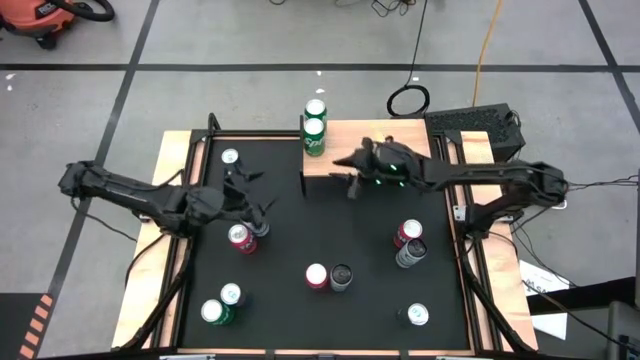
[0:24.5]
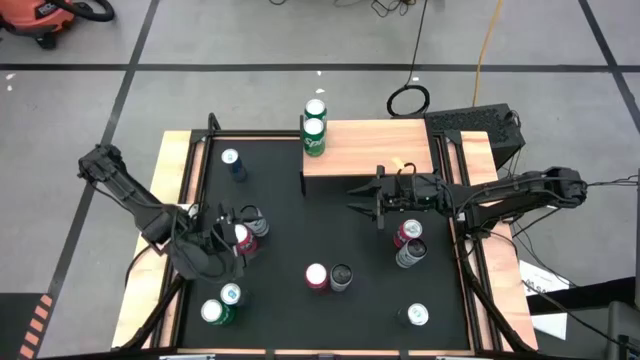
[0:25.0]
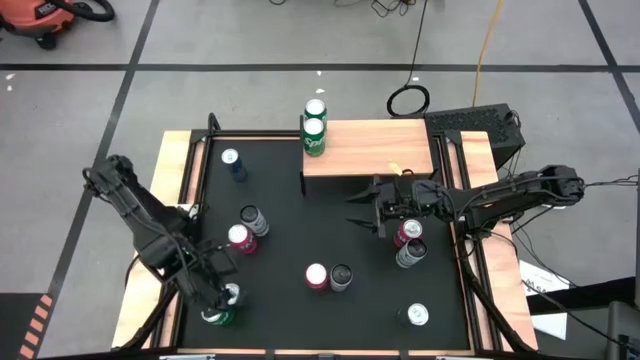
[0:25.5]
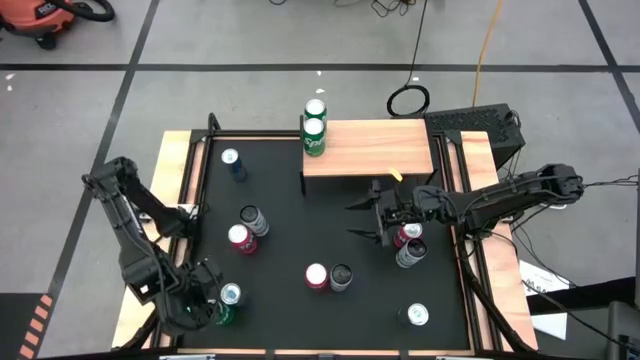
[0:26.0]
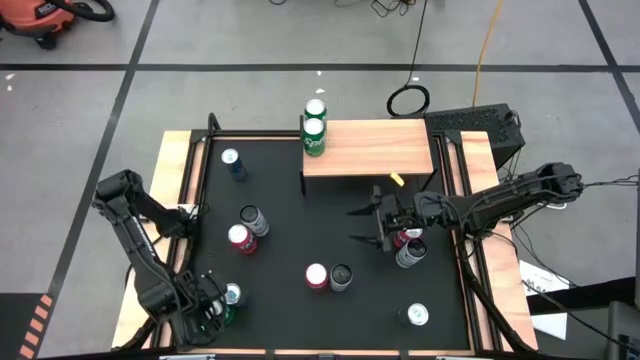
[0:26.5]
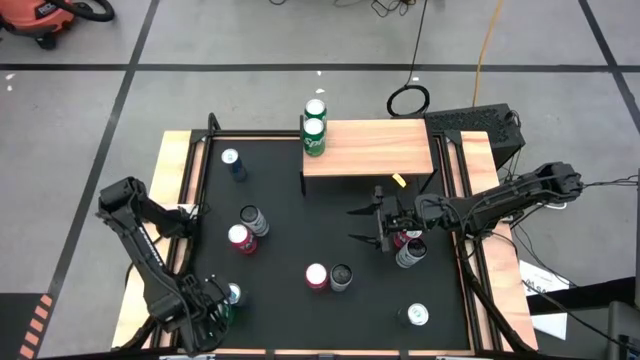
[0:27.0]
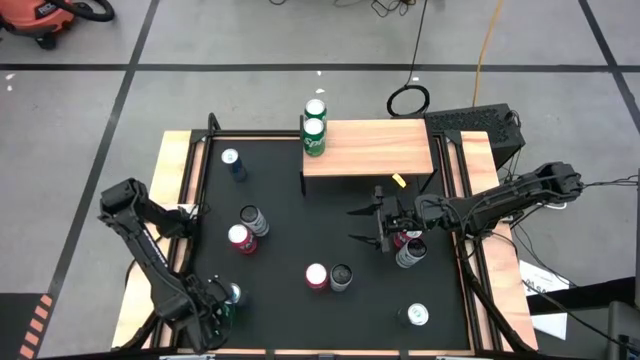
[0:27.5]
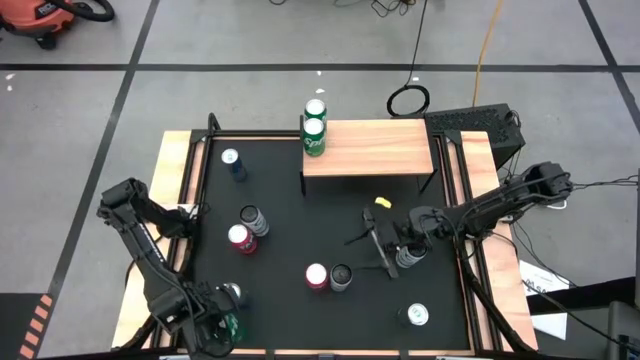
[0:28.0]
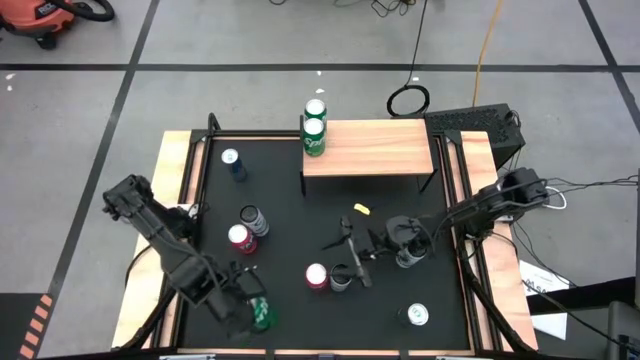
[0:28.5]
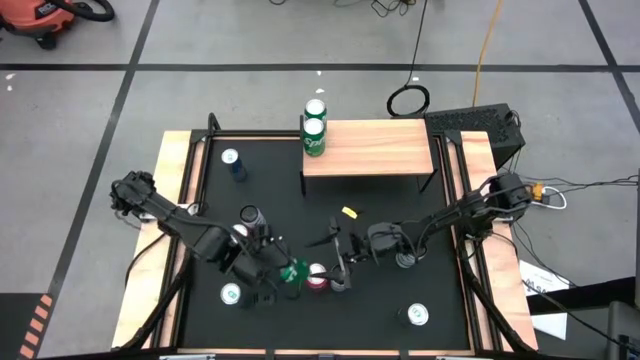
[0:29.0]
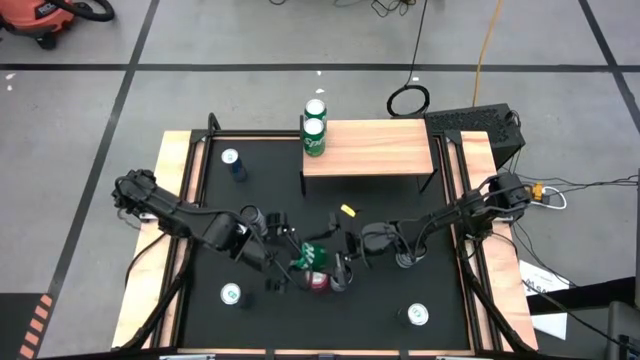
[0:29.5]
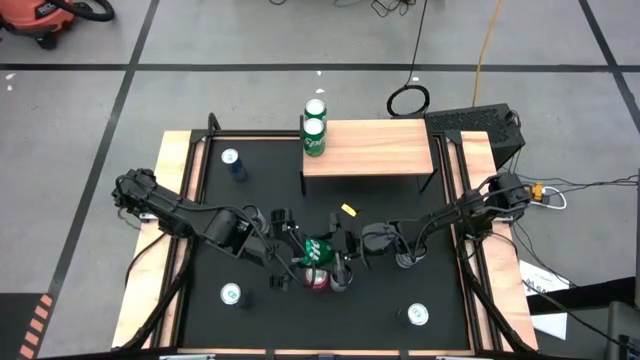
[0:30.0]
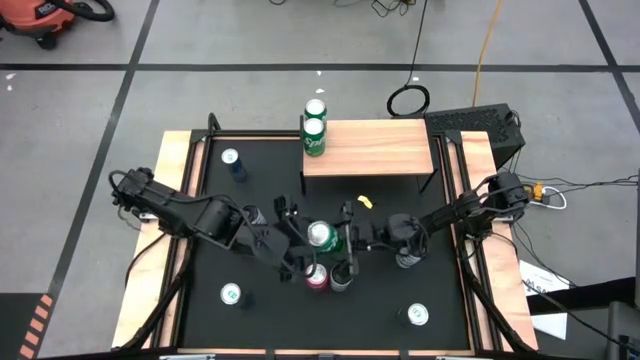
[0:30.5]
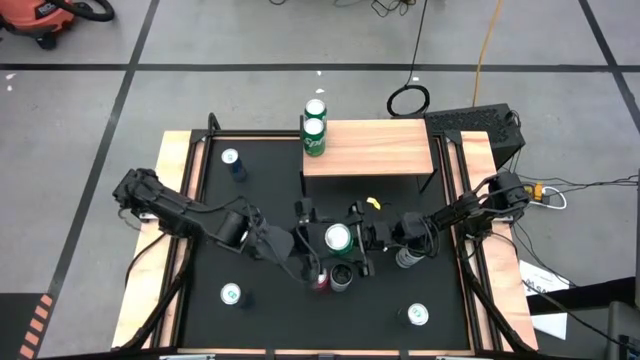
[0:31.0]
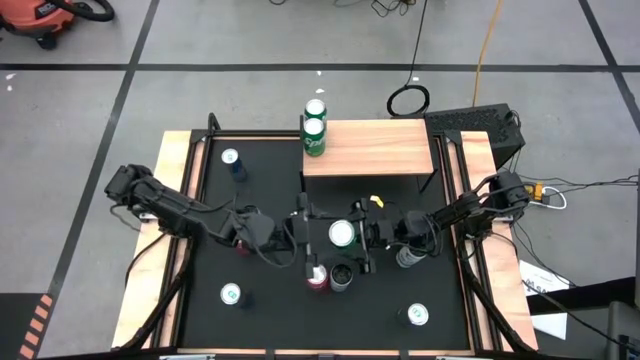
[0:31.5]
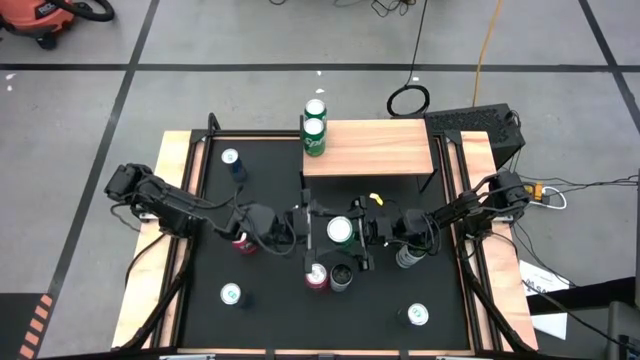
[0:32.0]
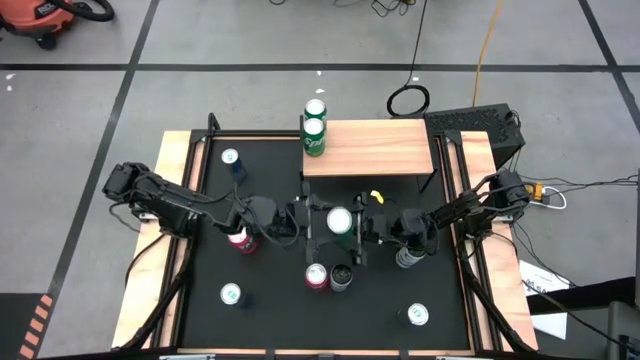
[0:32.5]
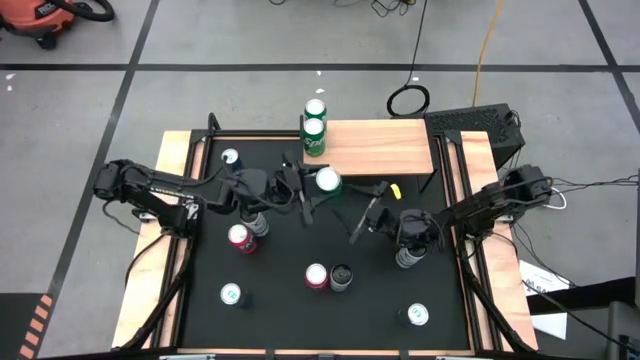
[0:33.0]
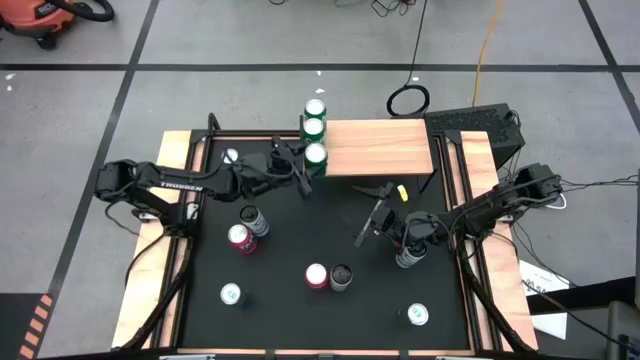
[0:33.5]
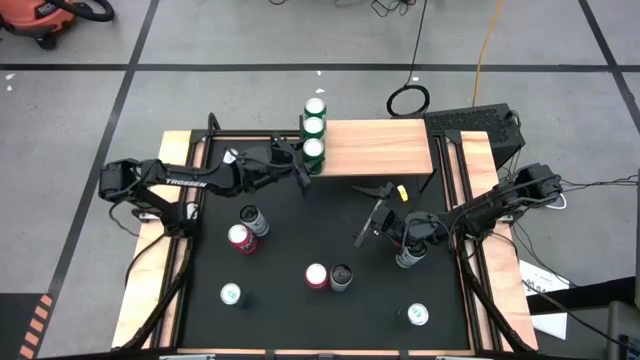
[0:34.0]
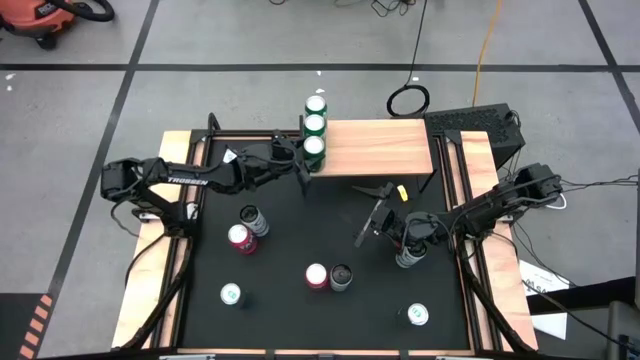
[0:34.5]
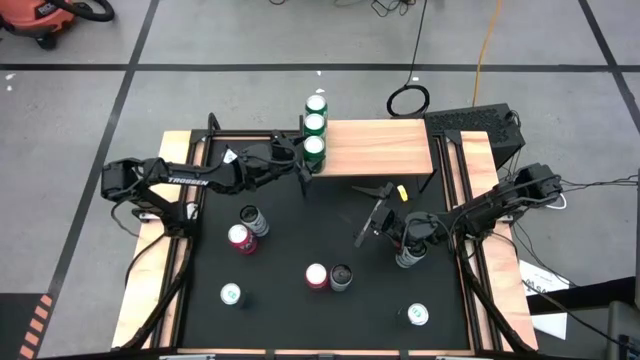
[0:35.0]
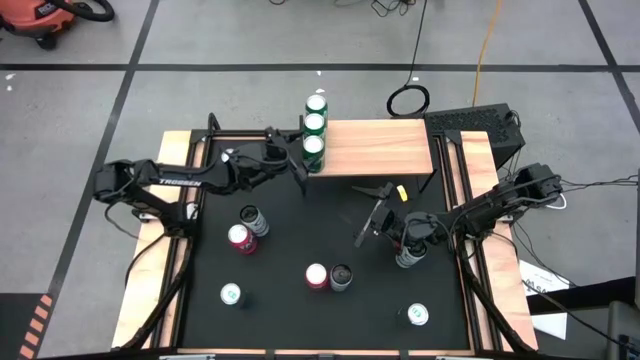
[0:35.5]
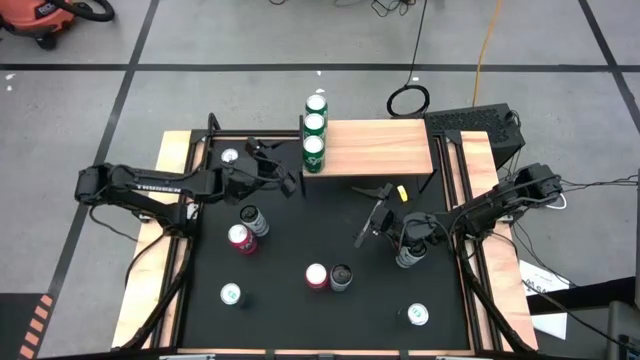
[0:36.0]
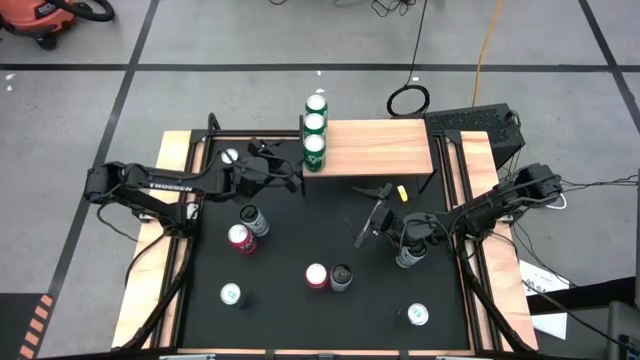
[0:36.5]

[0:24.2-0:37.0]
Task: Place canned beverage on shelf
Put the green soda can on the shelf

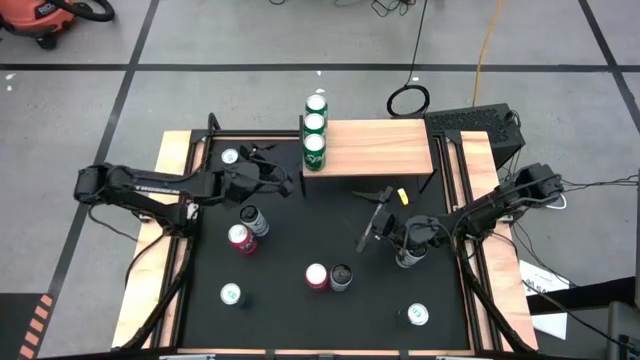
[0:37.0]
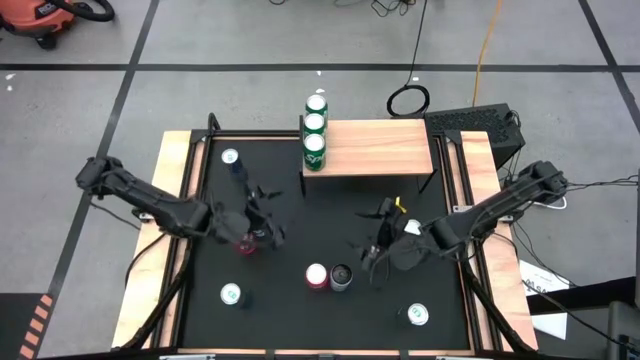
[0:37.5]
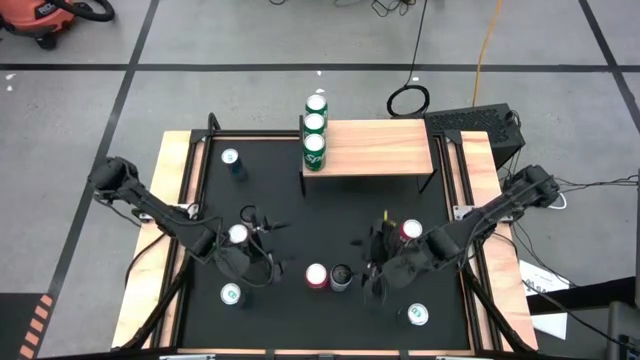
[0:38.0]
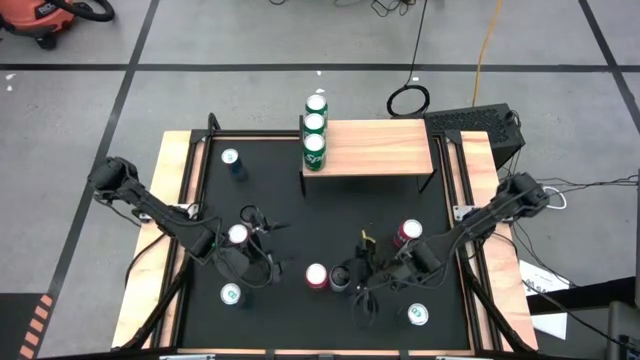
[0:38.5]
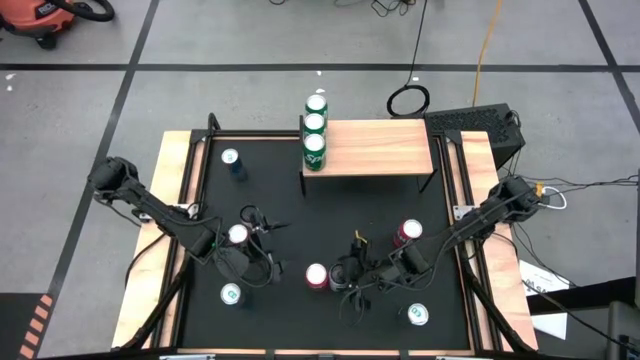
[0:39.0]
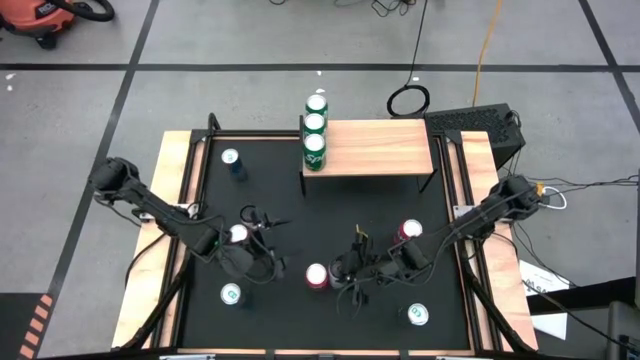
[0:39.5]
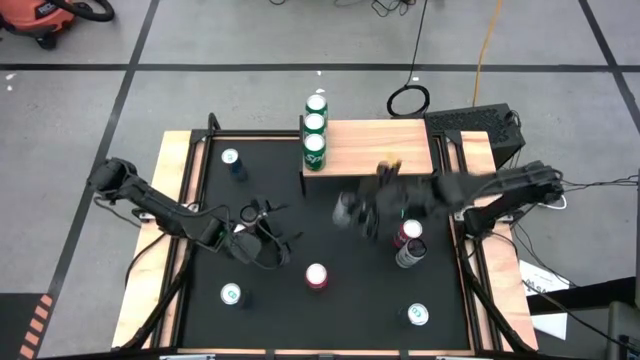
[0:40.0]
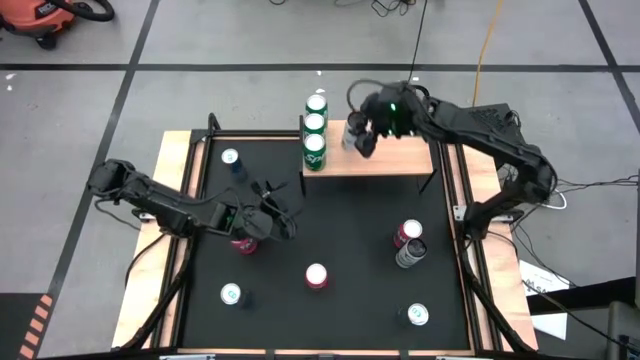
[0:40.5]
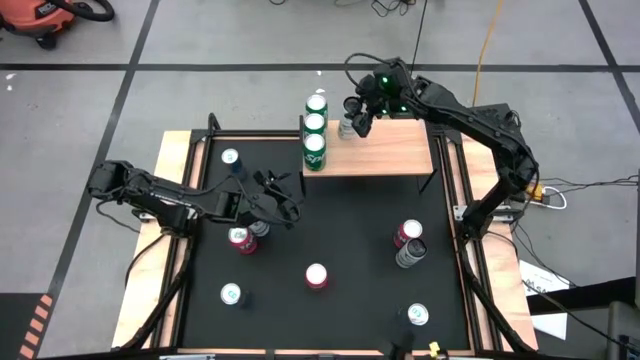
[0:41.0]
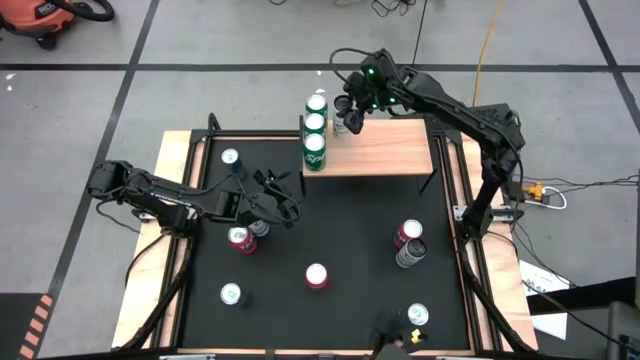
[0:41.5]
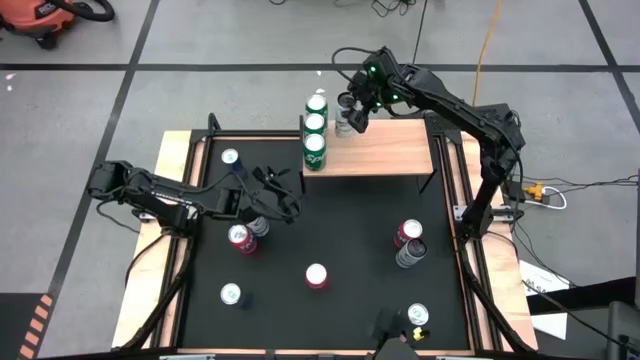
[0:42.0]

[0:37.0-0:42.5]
Put the center black soda can on the shelf
